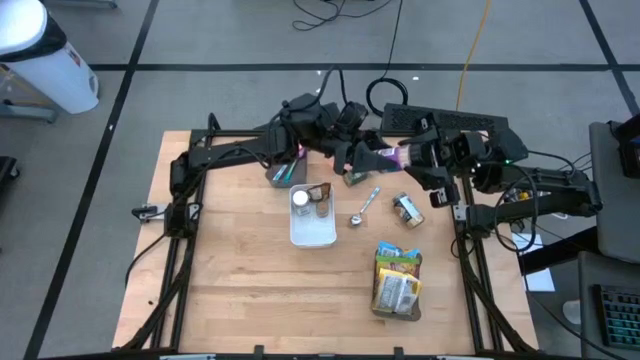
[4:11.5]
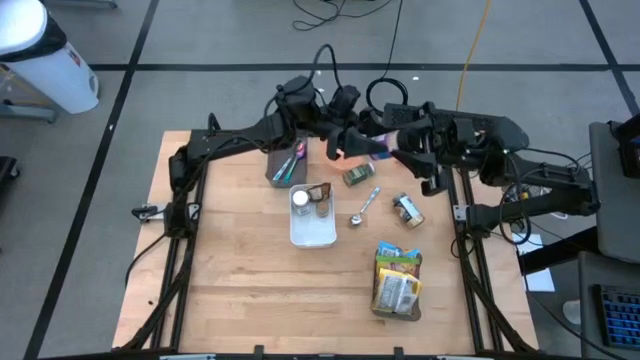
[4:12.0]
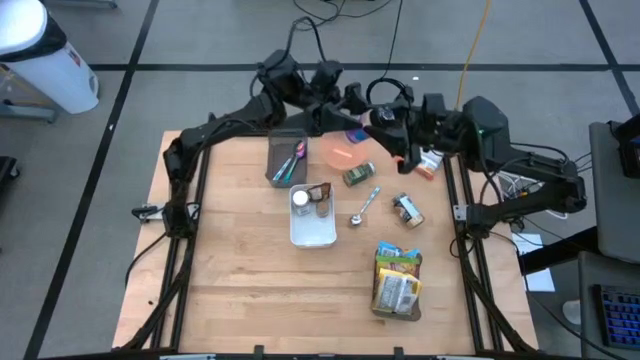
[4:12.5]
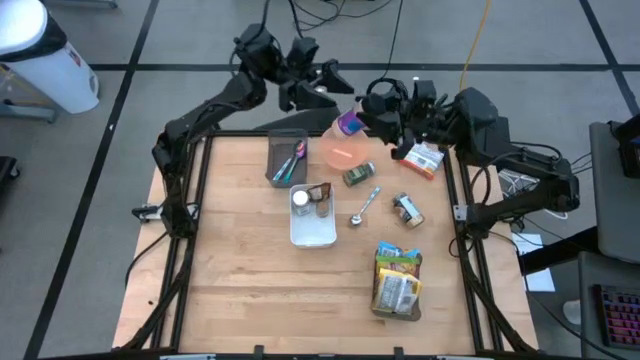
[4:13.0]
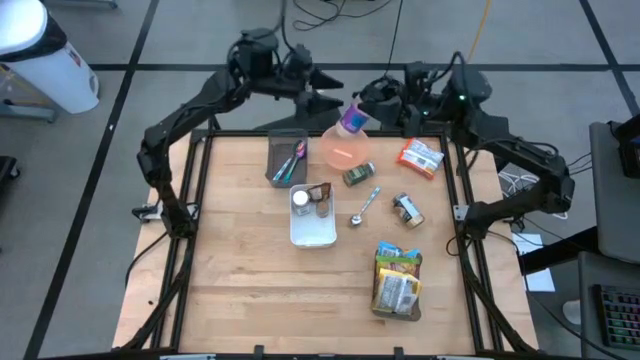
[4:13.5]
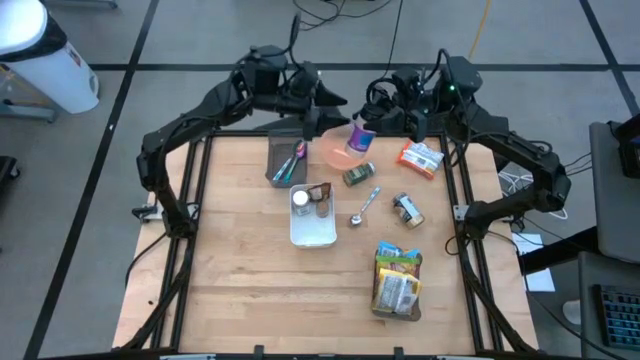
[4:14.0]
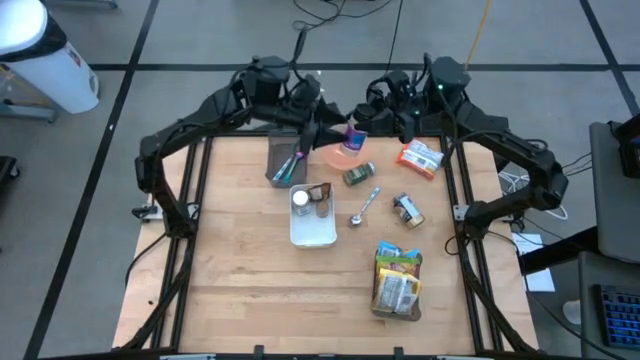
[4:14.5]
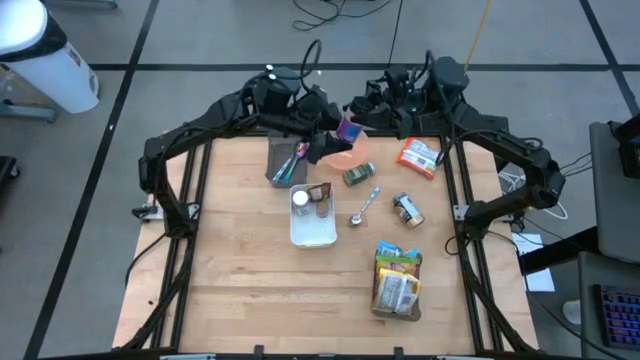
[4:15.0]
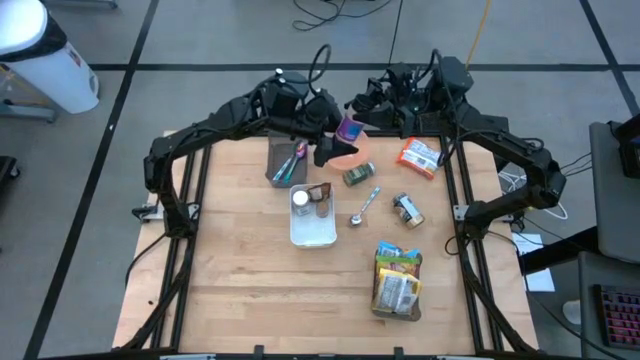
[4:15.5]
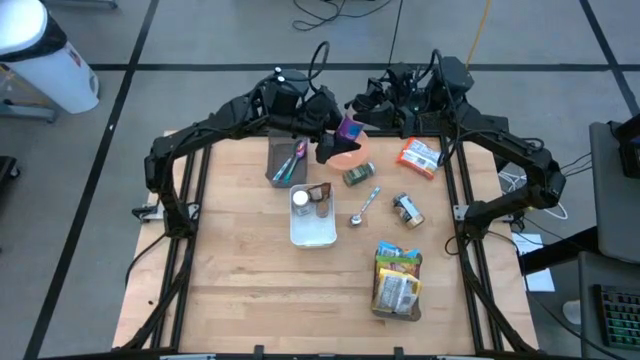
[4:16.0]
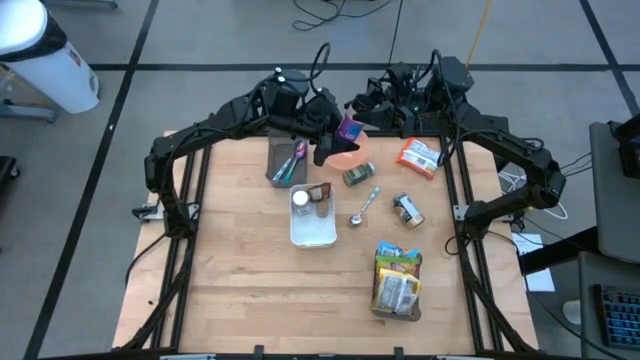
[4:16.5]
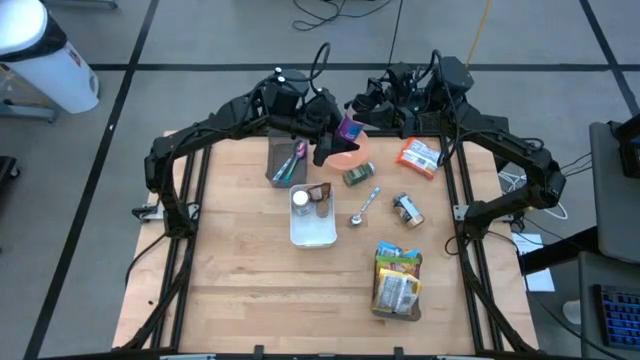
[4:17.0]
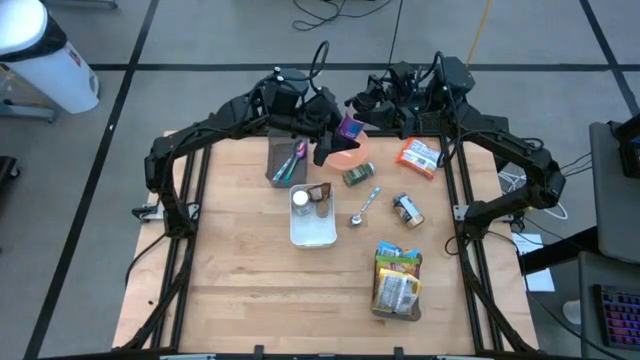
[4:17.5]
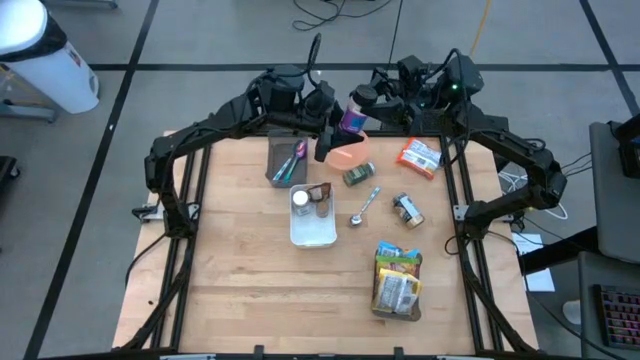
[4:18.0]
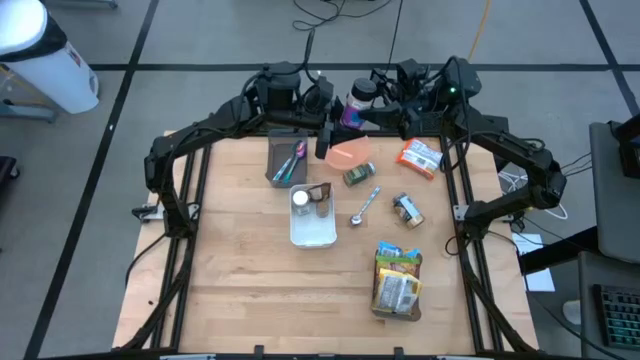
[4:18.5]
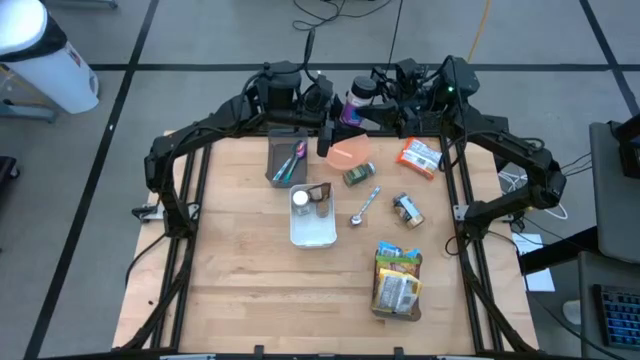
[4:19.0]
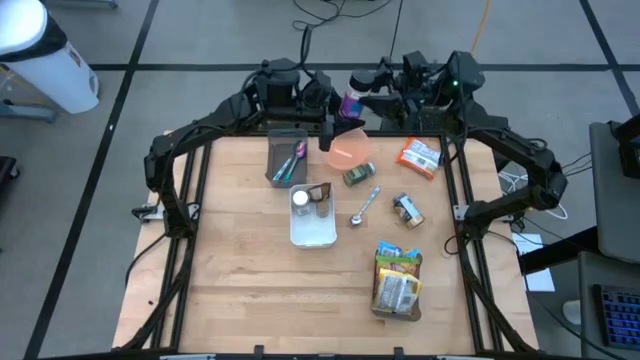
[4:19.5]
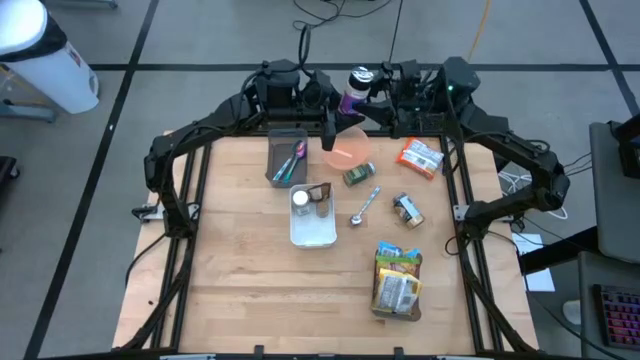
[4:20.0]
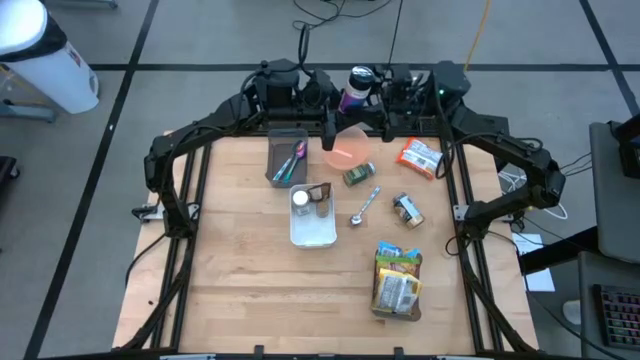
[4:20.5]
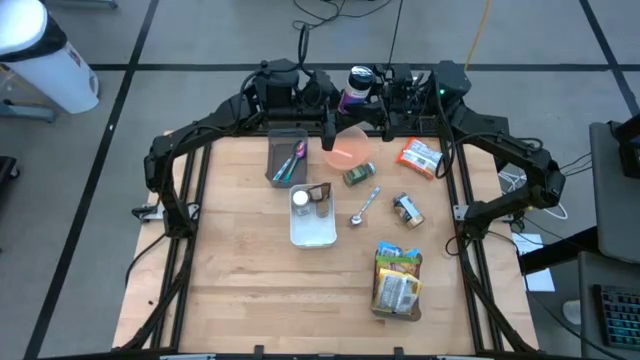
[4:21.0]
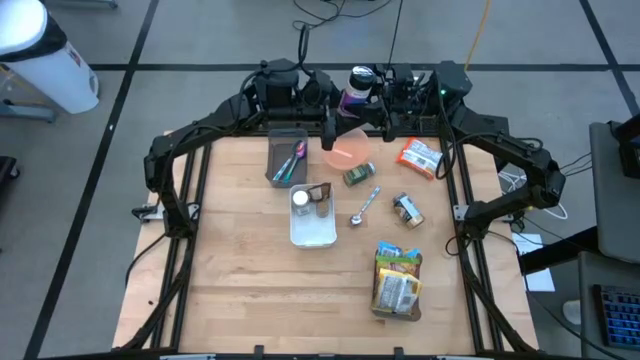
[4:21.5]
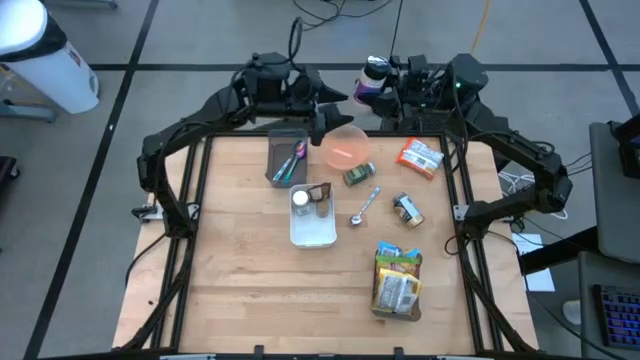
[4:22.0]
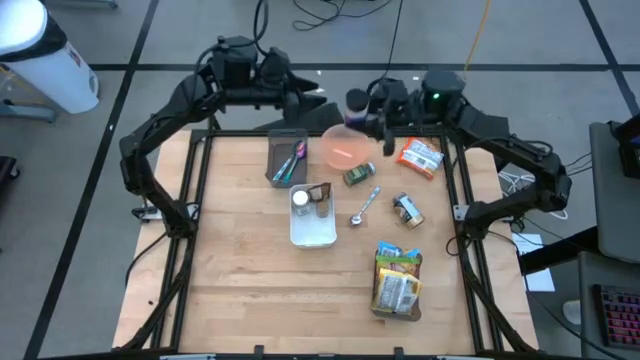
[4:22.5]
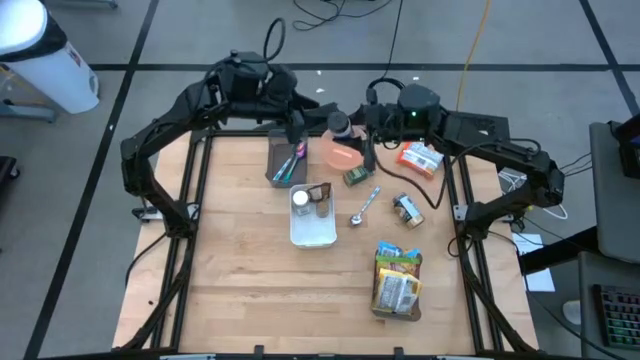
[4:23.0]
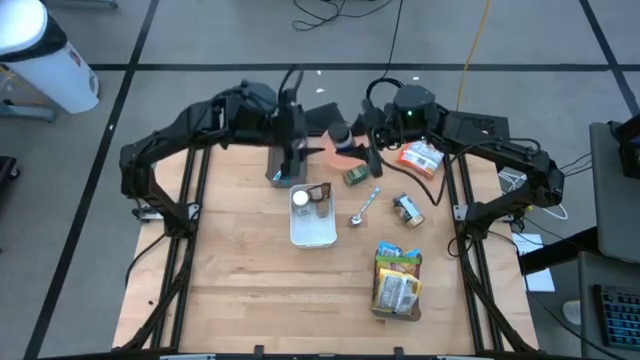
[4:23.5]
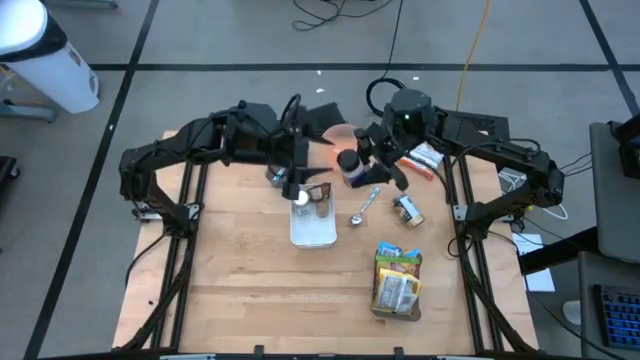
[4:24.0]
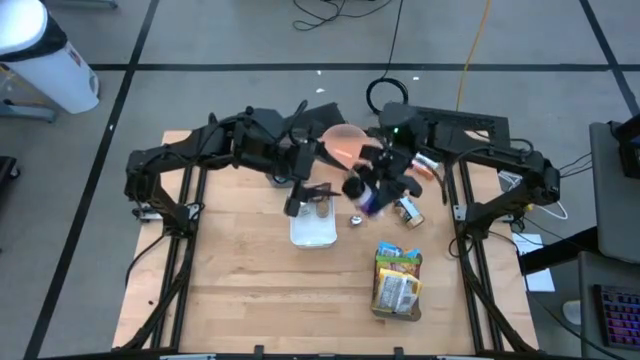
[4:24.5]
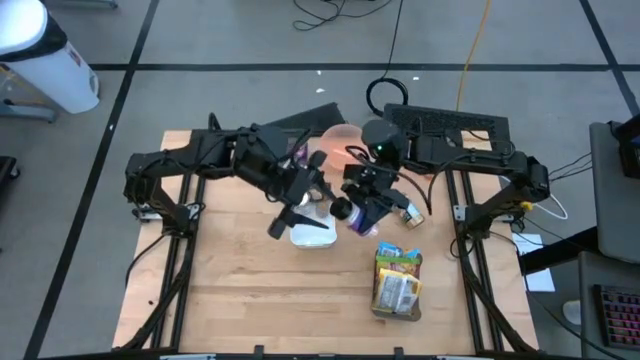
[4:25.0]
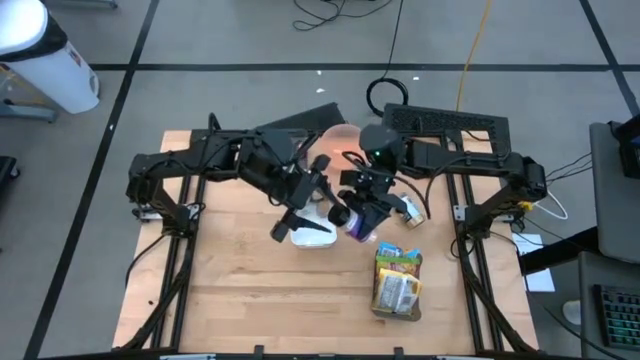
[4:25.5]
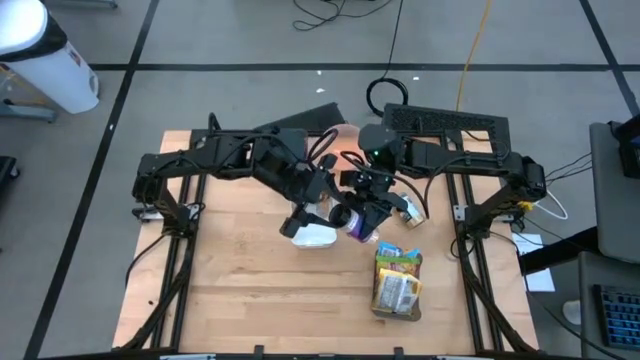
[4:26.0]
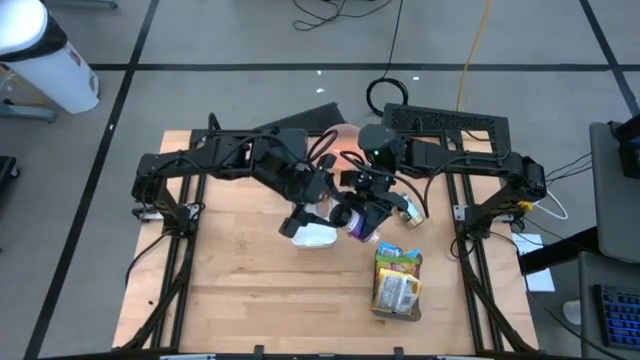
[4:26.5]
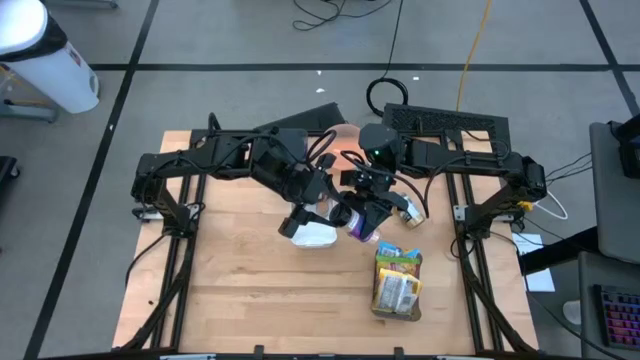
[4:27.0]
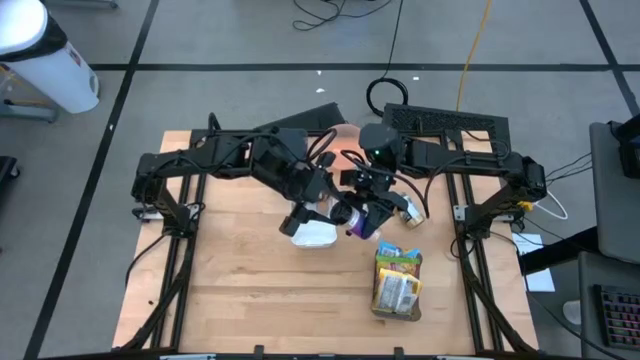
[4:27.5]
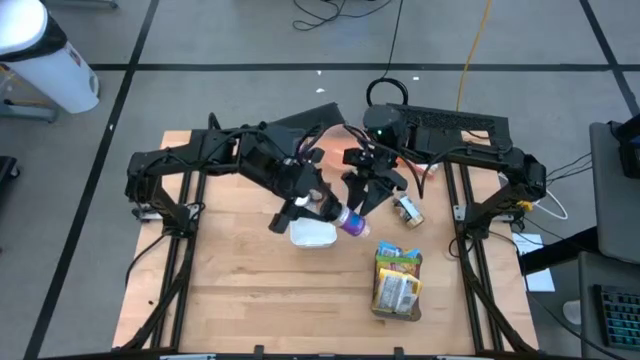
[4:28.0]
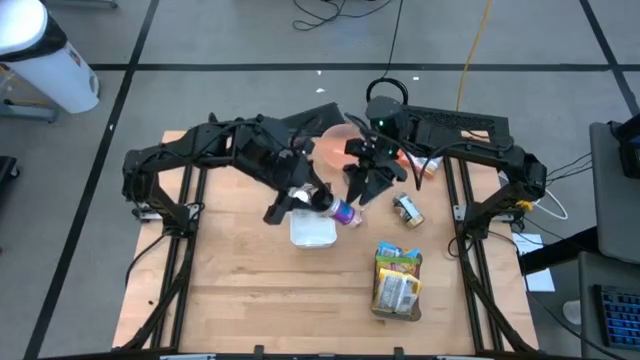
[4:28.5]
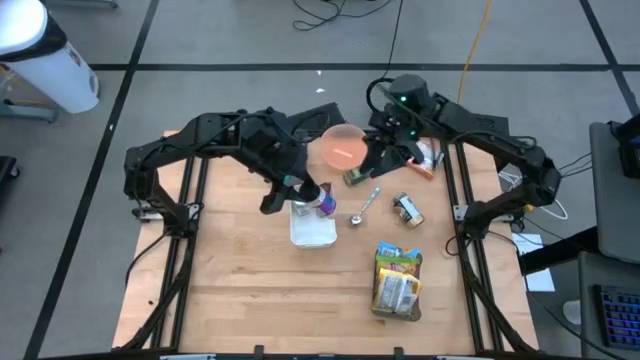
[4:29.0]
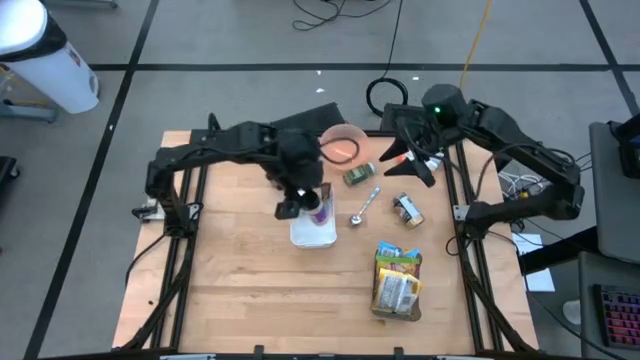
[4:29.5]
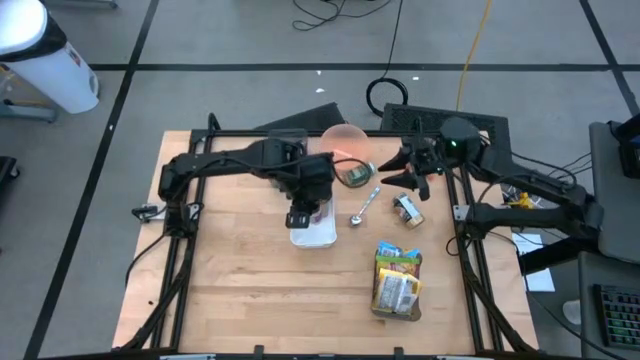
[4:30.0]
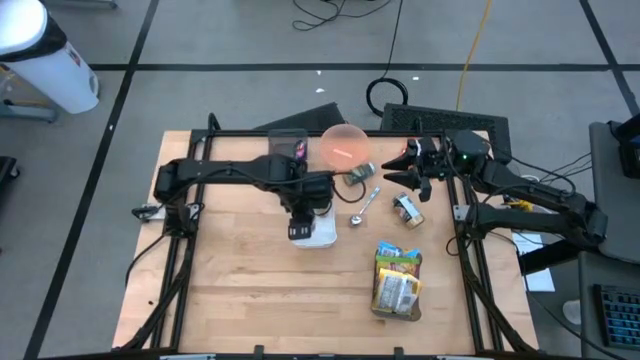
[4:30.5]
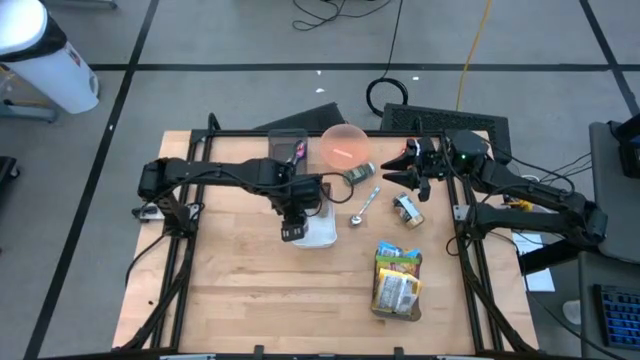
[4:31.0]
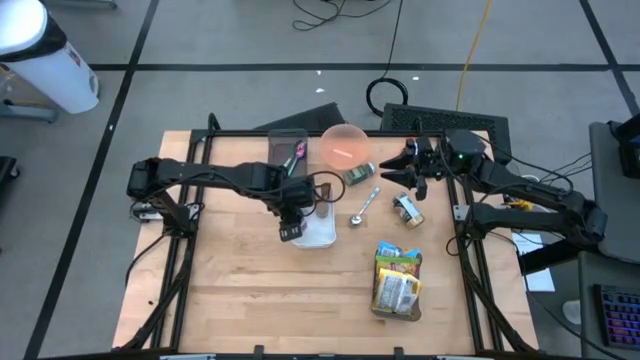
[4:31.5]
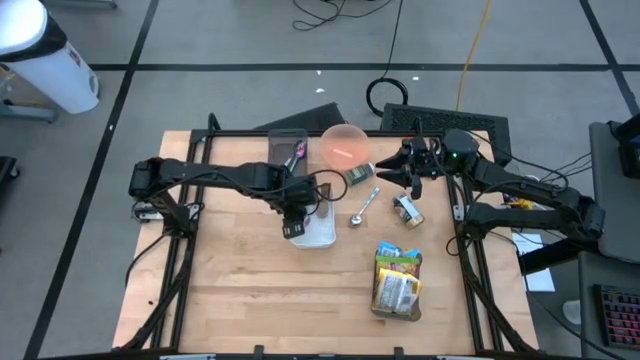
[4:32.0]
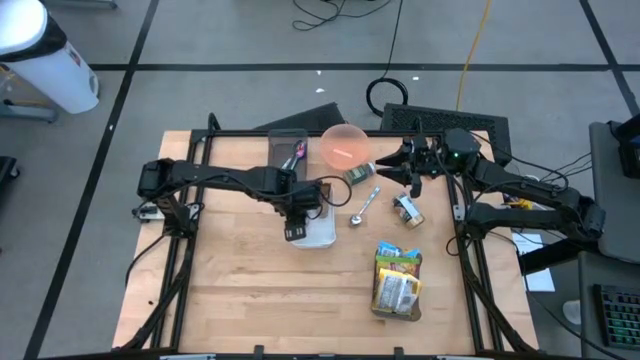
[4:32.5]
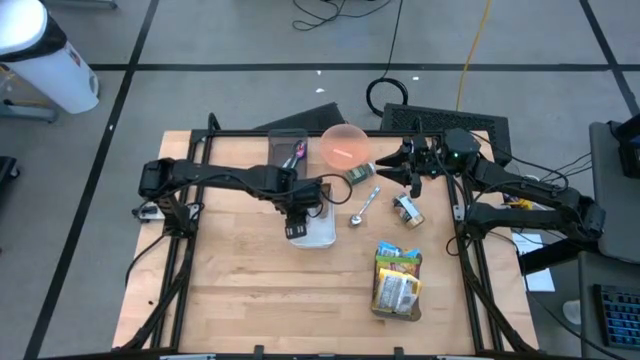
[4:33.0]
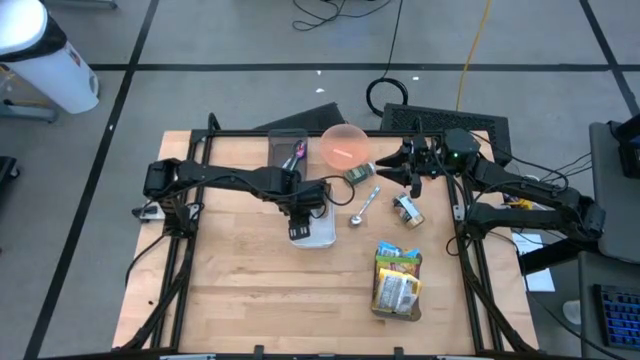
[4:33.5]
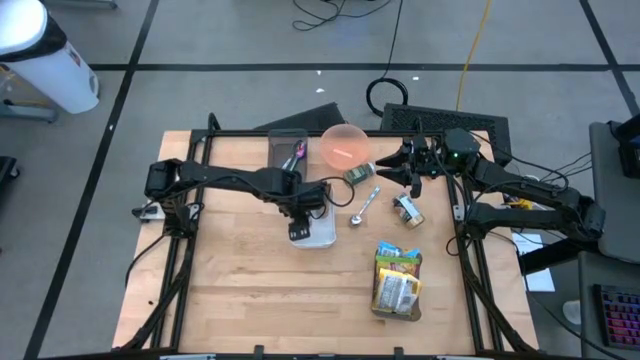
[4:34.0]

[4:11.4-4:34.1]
Task: Pick & Place Food Item
Put the purple seasoning bottle into the white bin
